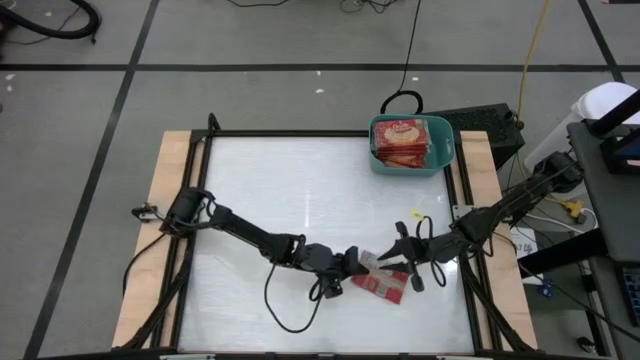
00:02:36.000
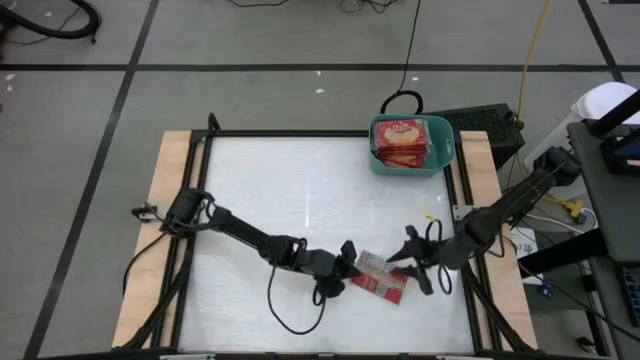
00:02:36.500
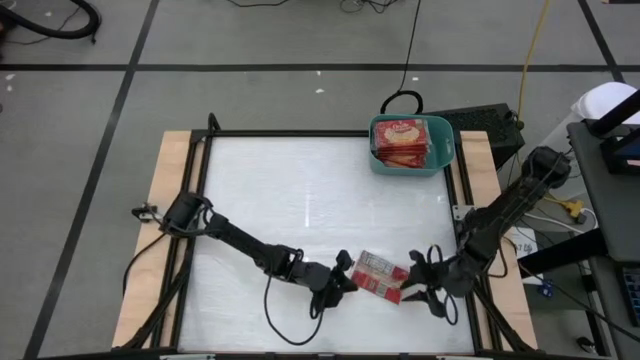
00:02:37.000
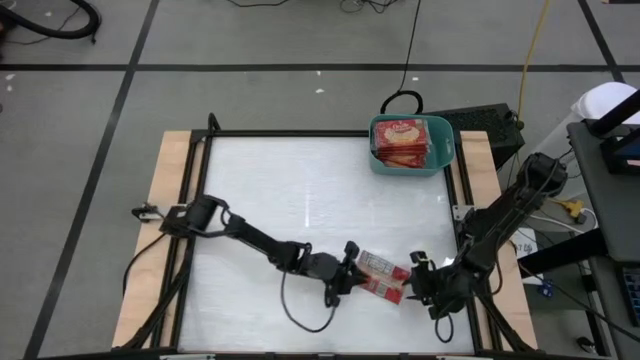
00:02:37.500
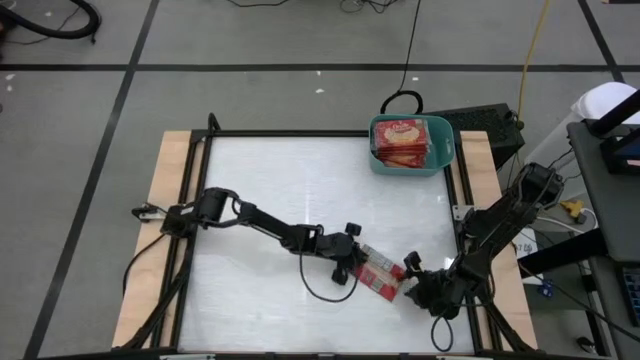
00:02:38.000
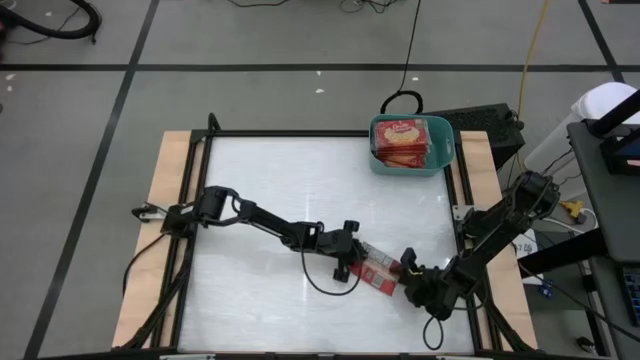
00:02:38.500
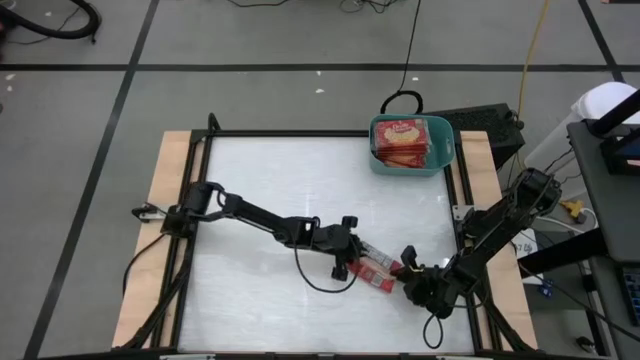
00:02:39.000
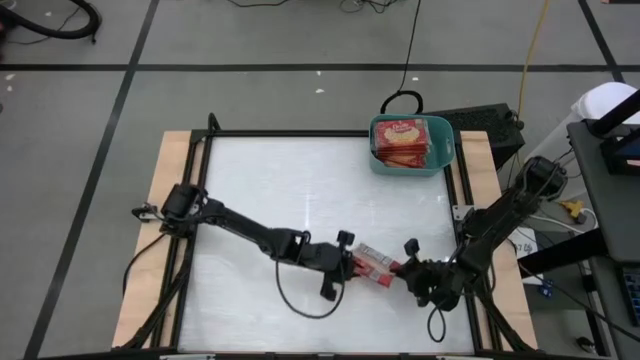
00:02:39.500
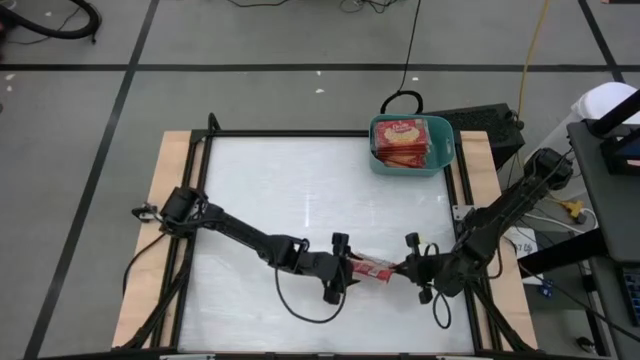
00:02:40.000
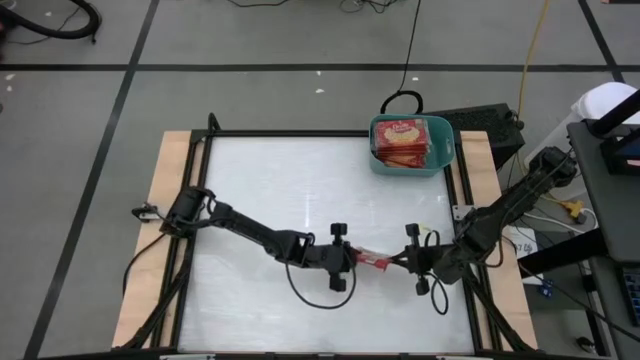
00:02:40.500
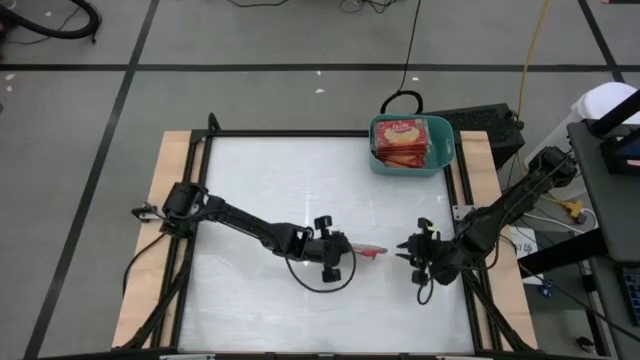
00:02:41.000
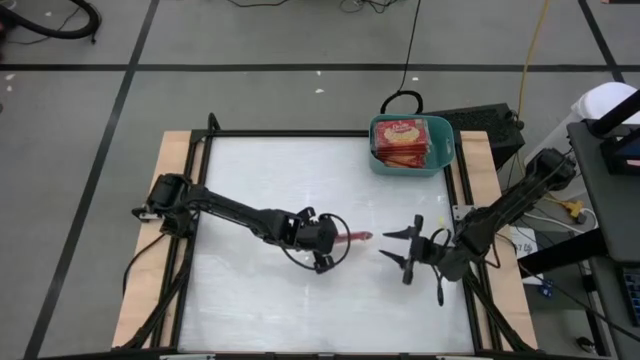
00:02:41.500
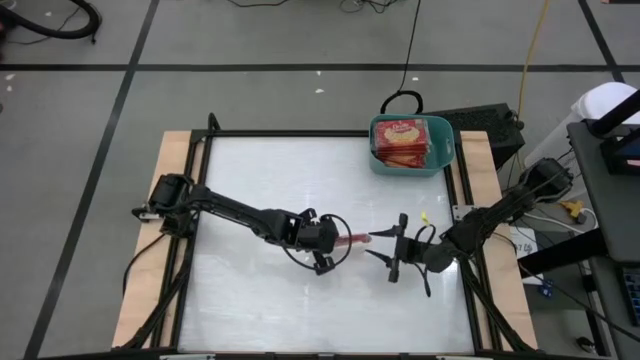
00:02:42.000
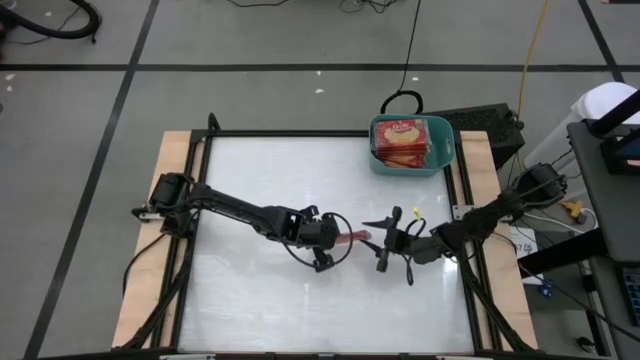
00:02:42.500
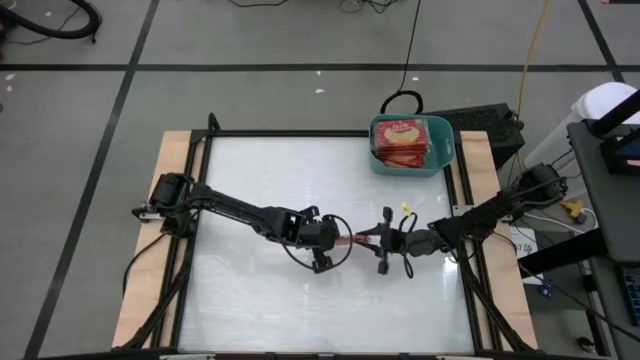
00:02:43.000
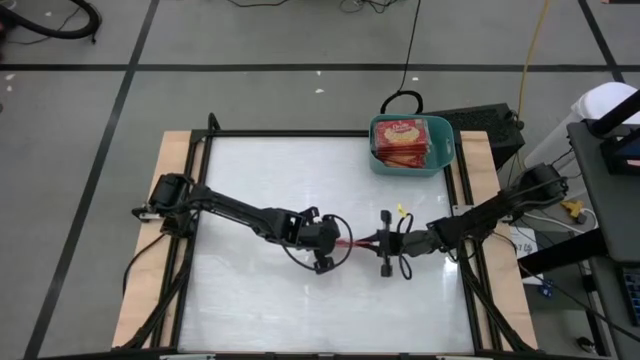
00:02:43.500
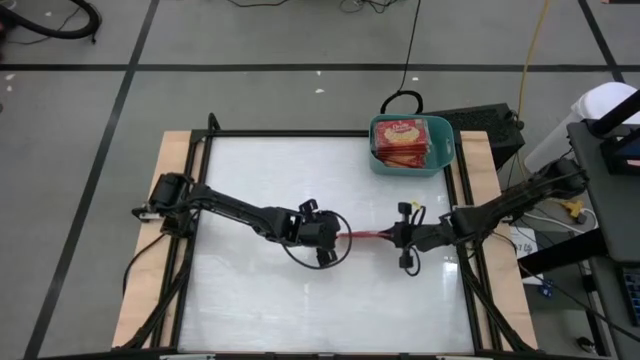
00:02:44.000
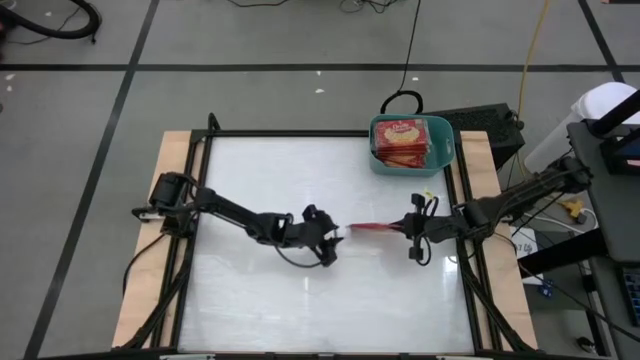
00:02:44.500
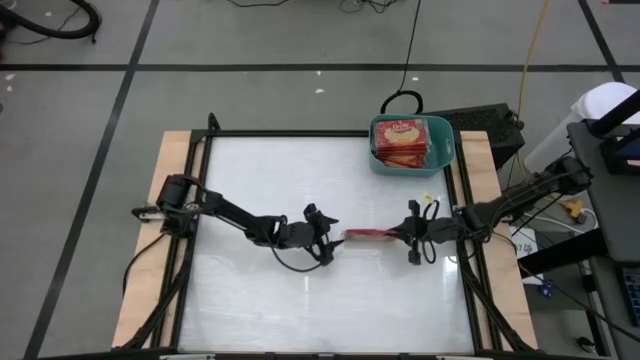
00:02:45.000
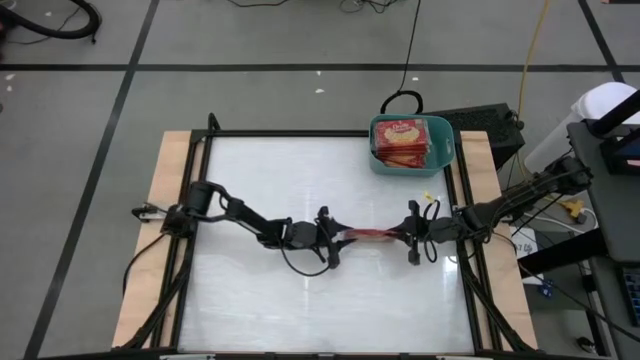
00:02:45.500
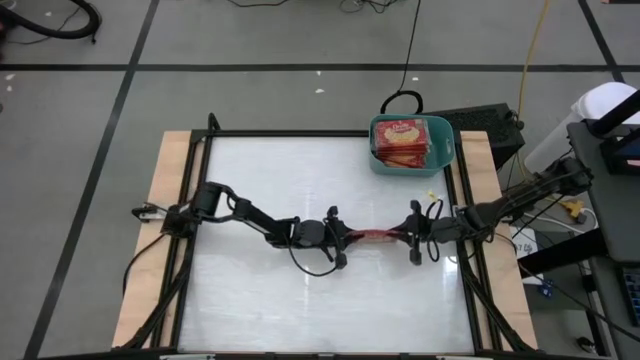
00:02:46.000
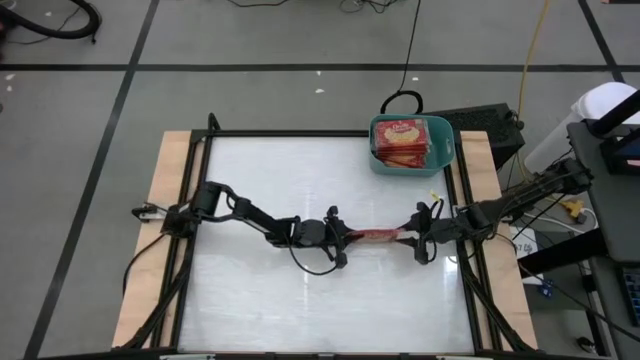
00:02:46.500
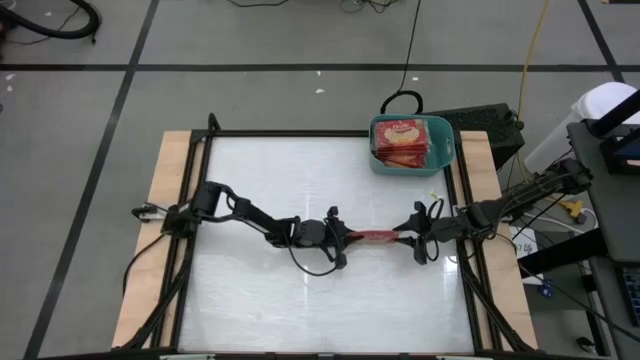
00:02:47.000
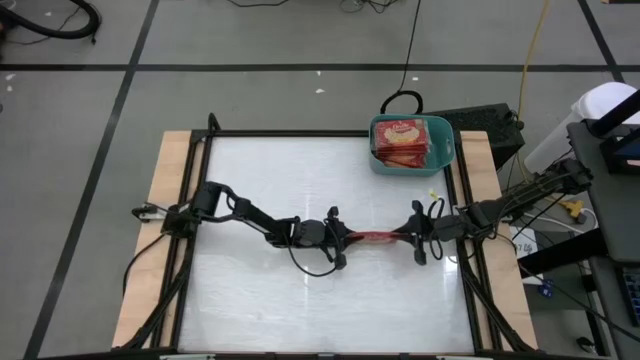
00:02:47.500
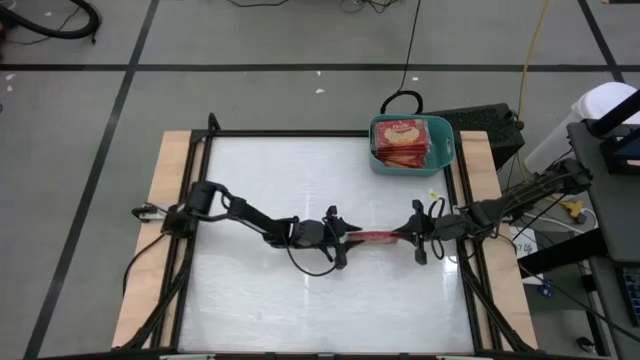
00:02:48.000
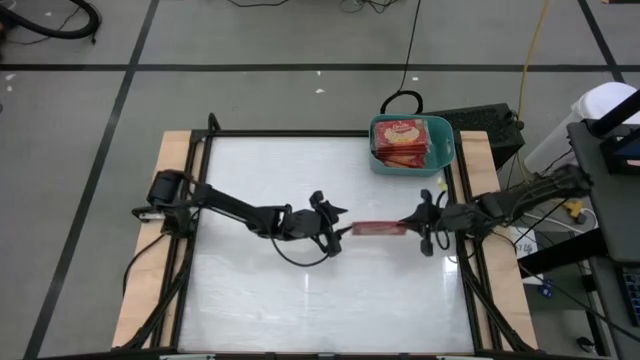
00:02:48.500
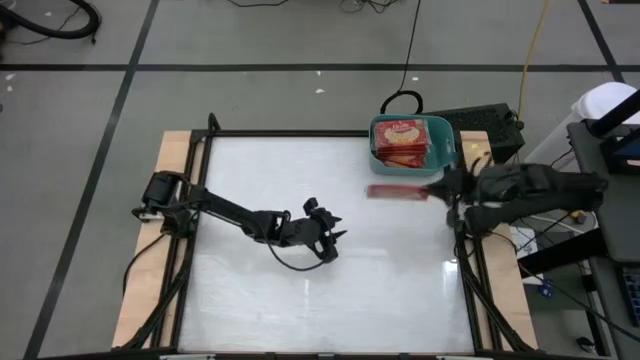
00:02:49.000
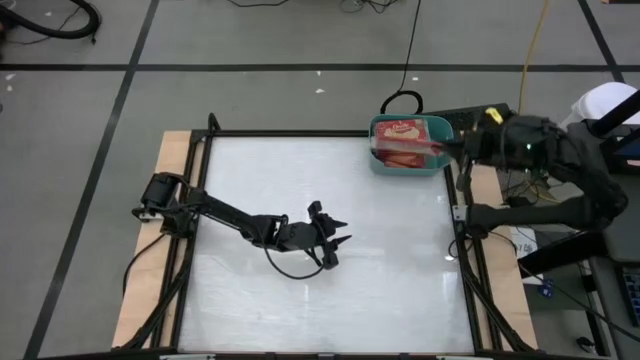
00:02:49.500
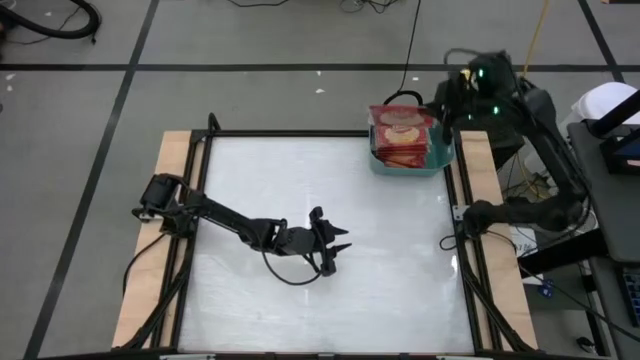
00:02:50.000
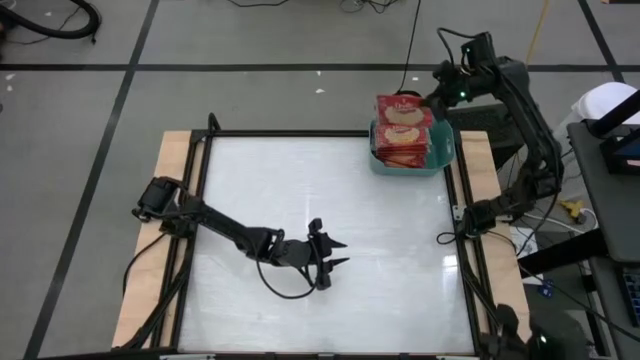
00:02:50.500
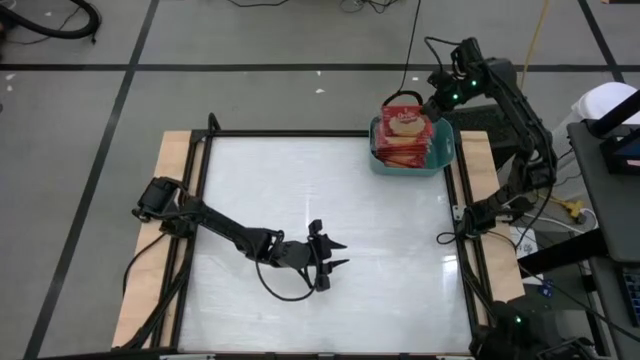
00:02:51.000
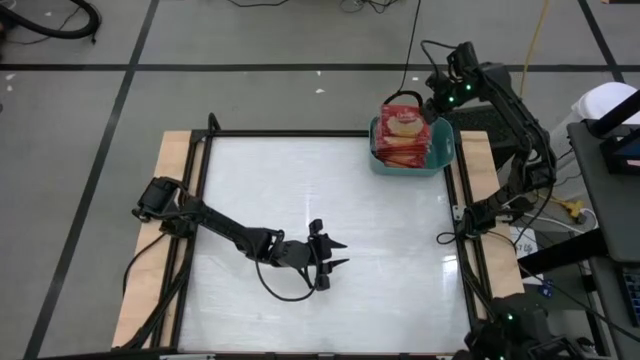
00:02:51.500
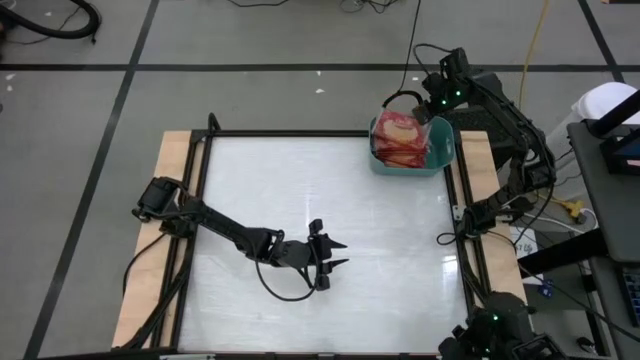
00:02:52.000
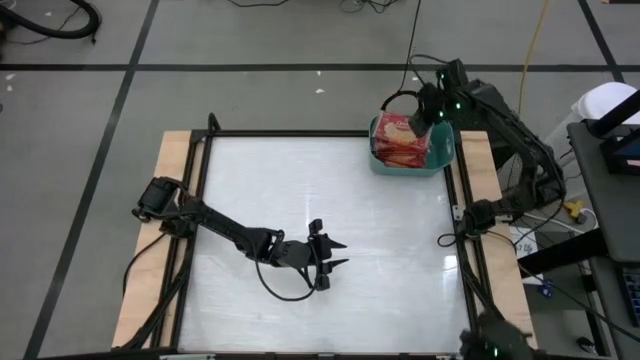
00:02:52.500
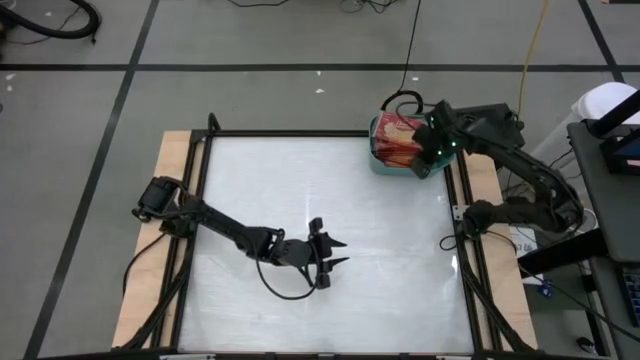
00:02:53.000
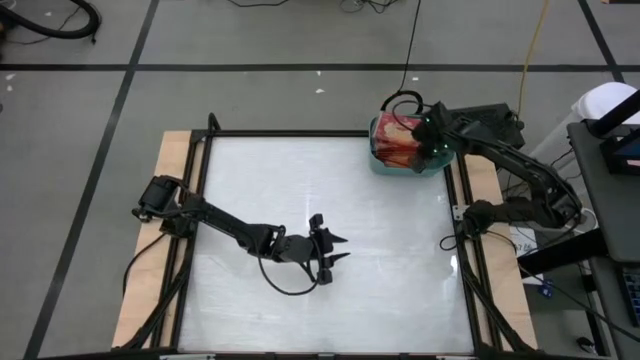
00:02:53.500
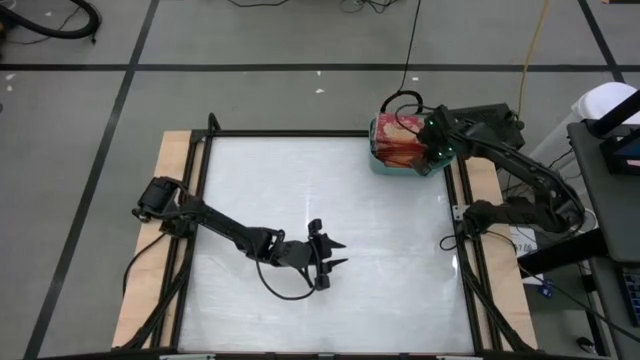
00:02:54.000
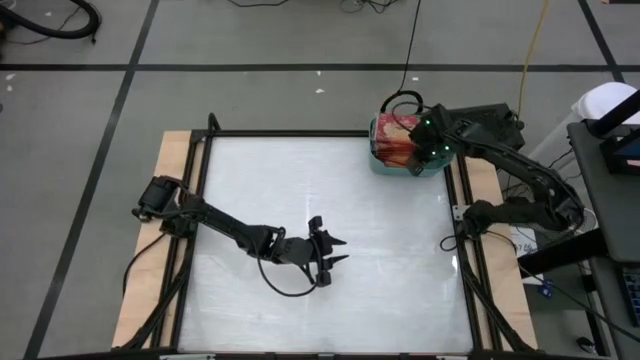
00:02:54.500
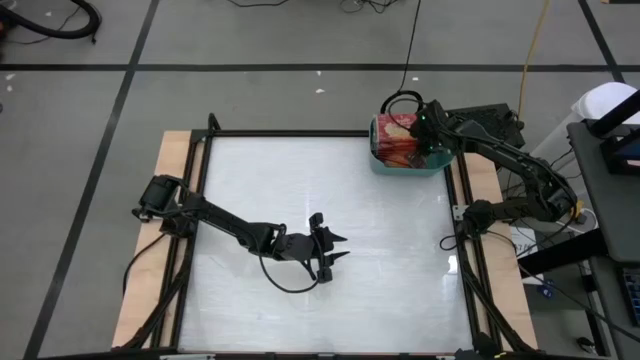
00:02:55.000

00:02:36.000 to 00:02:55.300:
Task: Sort popcorn bags into baskets
Put the red popcorn bag into the green bin
